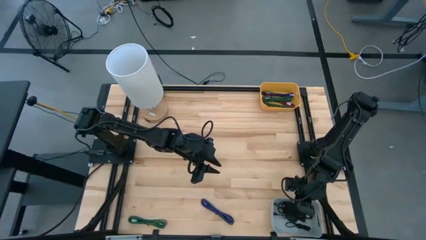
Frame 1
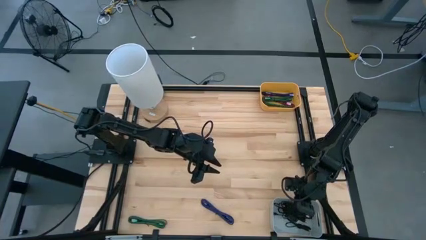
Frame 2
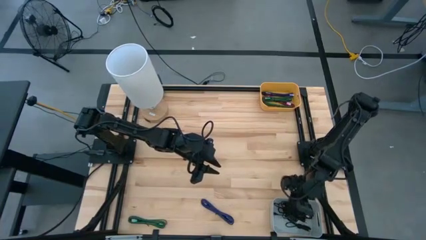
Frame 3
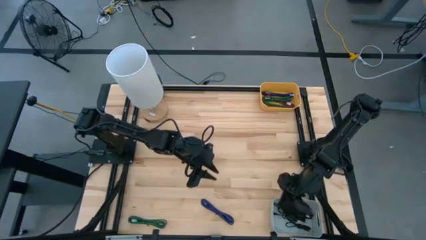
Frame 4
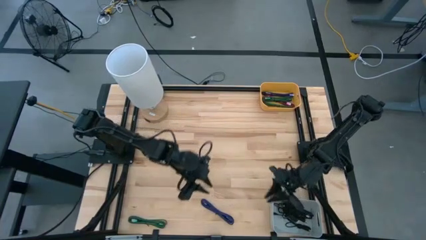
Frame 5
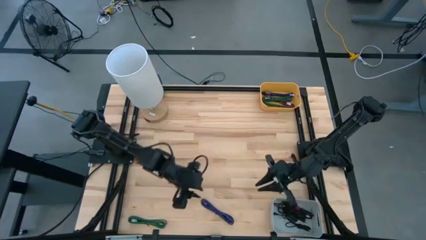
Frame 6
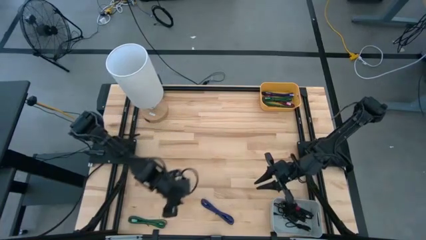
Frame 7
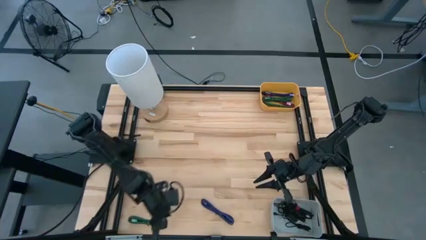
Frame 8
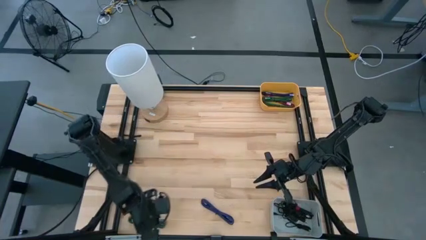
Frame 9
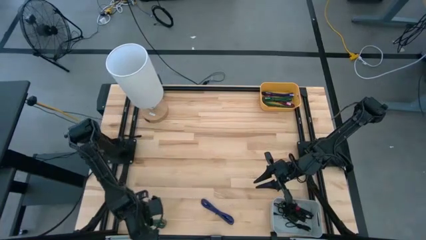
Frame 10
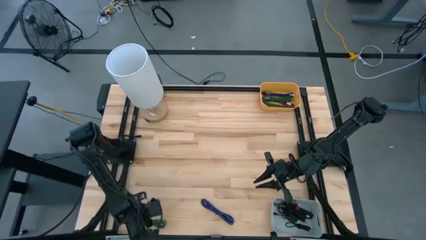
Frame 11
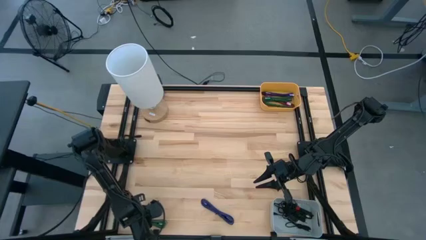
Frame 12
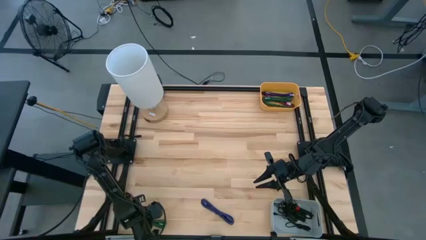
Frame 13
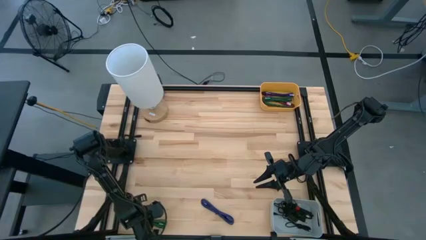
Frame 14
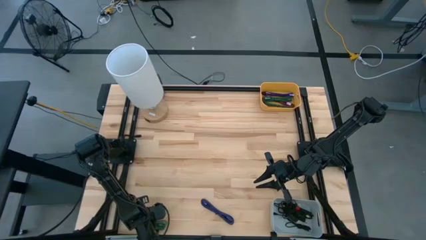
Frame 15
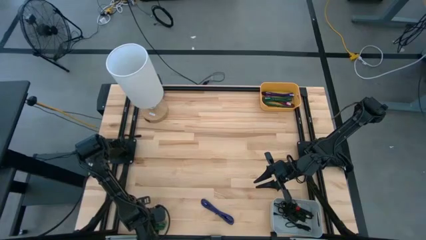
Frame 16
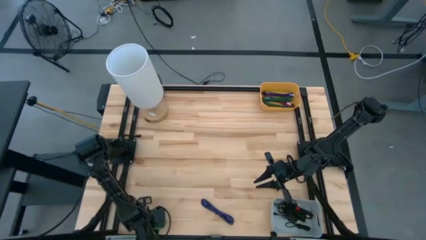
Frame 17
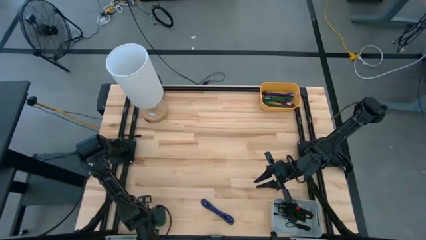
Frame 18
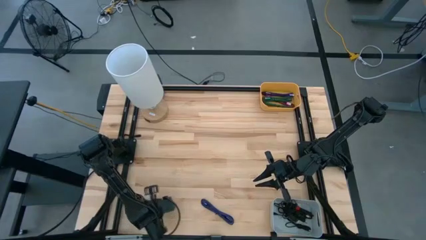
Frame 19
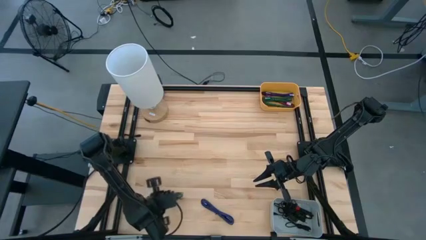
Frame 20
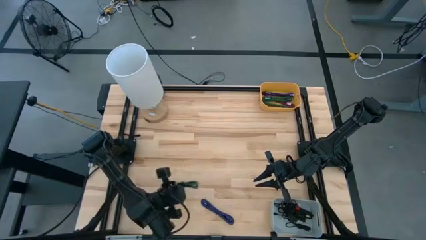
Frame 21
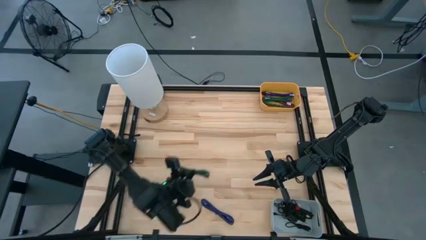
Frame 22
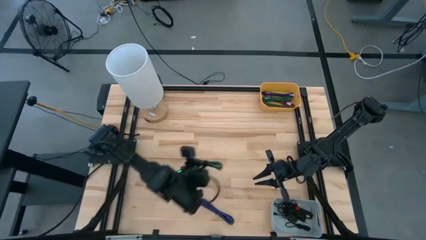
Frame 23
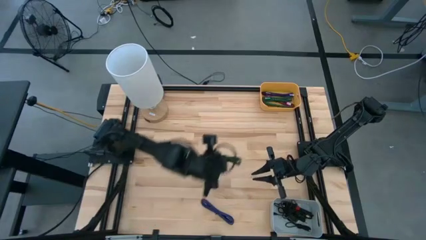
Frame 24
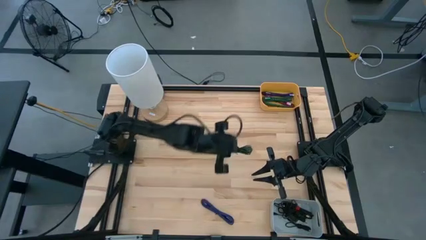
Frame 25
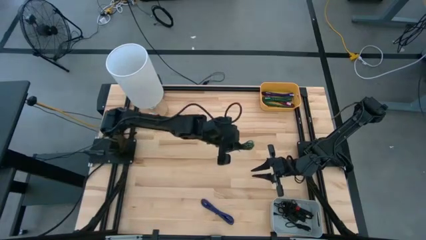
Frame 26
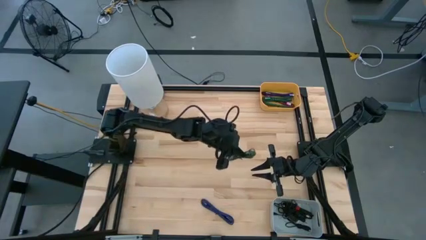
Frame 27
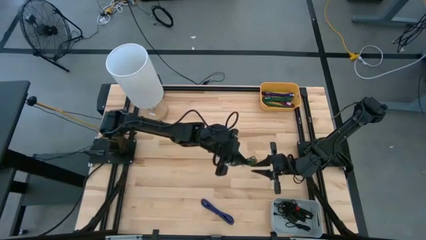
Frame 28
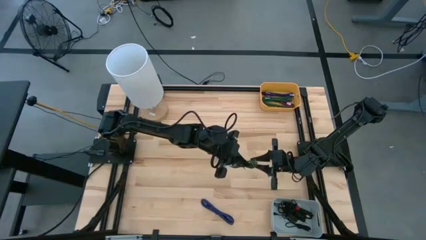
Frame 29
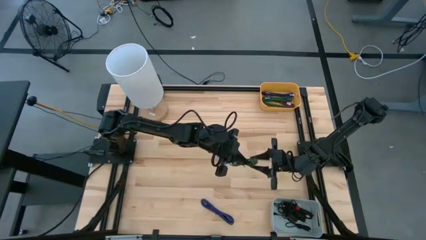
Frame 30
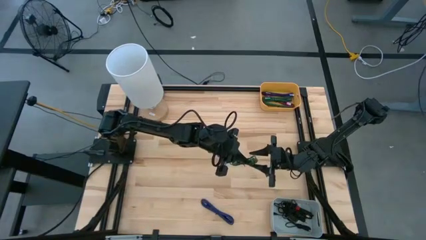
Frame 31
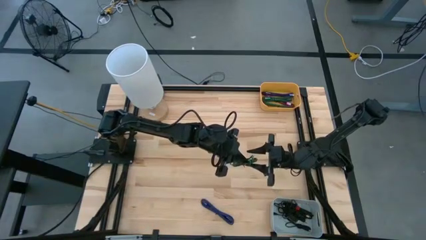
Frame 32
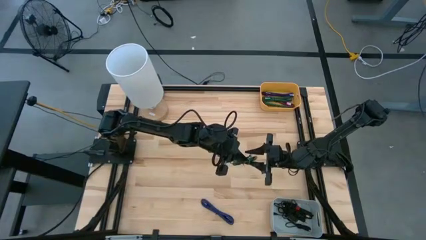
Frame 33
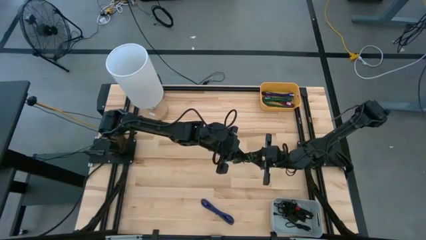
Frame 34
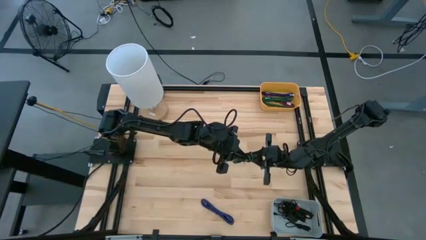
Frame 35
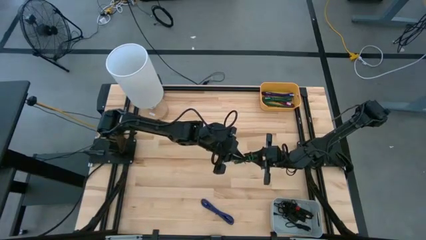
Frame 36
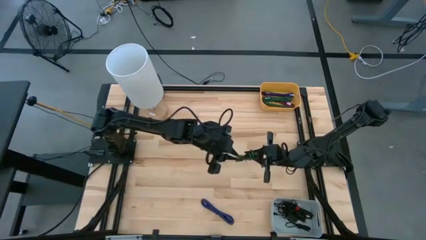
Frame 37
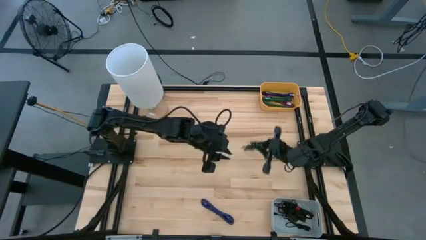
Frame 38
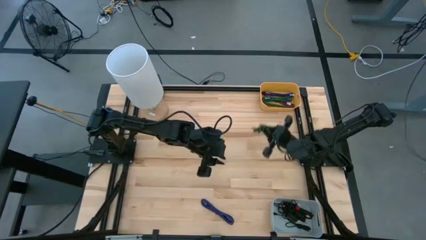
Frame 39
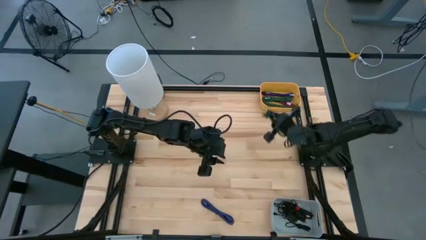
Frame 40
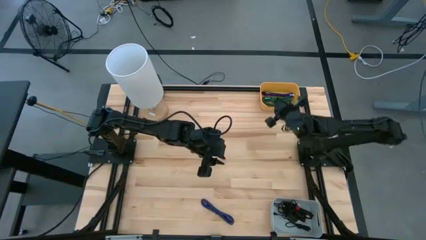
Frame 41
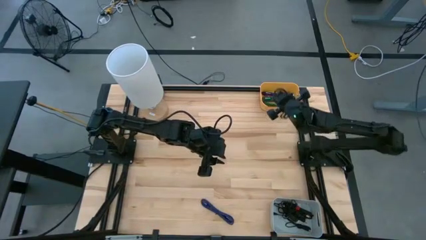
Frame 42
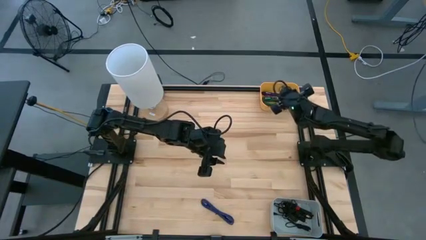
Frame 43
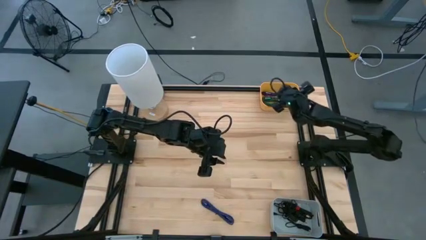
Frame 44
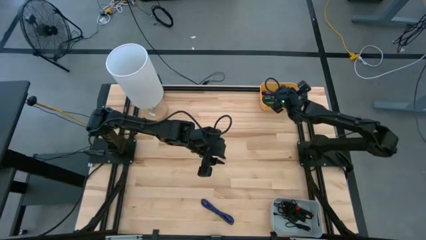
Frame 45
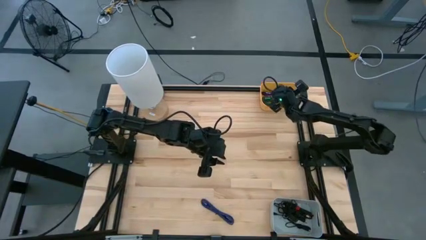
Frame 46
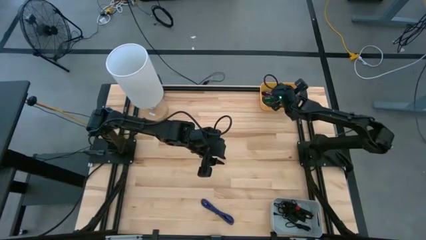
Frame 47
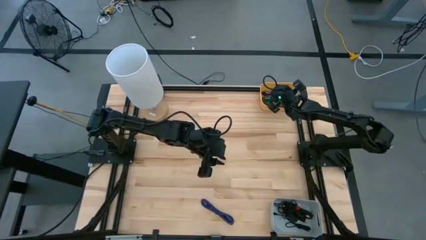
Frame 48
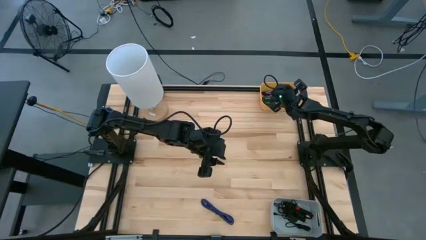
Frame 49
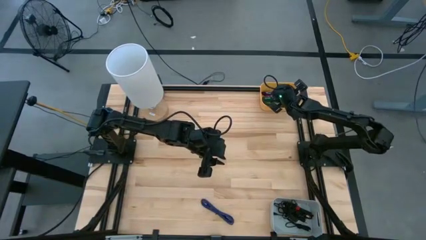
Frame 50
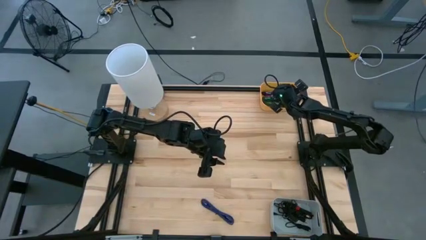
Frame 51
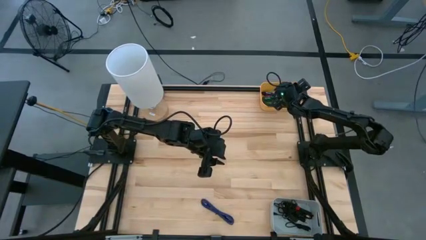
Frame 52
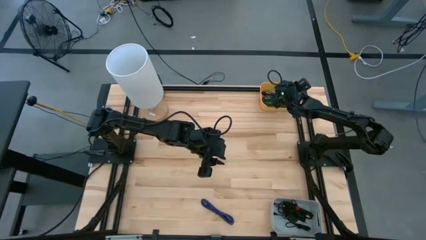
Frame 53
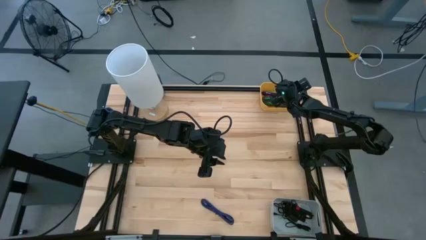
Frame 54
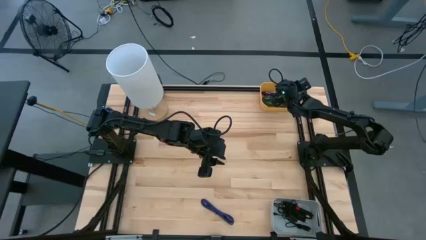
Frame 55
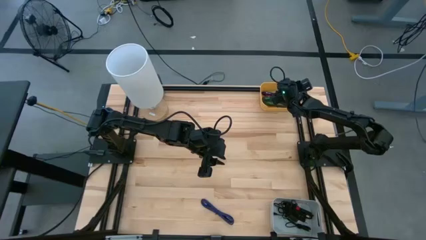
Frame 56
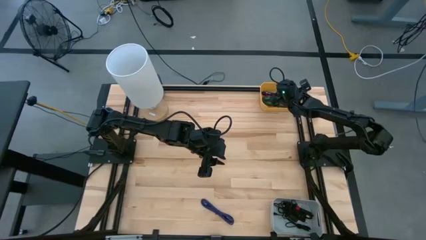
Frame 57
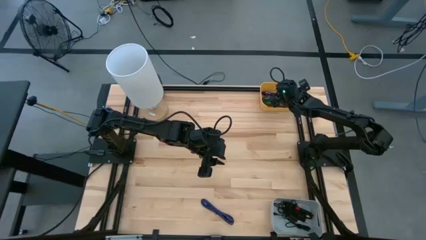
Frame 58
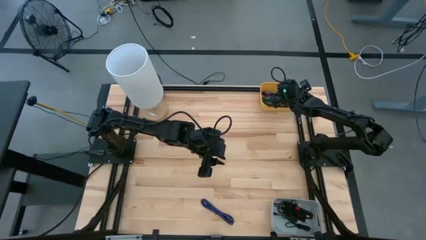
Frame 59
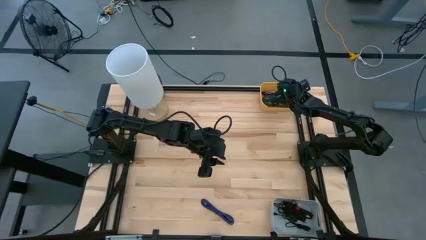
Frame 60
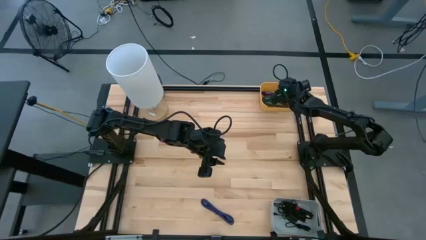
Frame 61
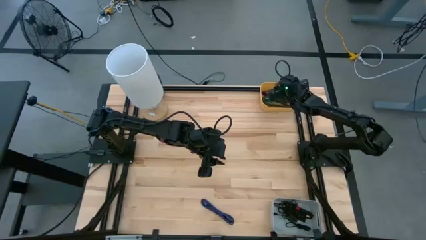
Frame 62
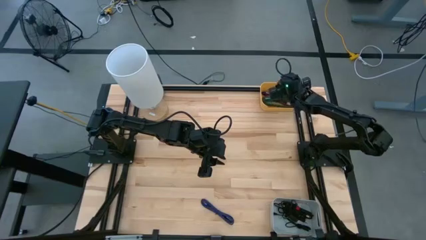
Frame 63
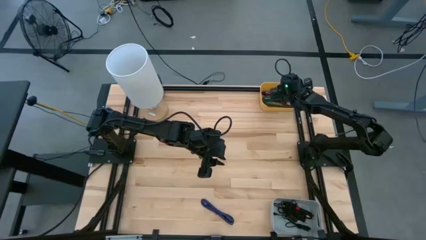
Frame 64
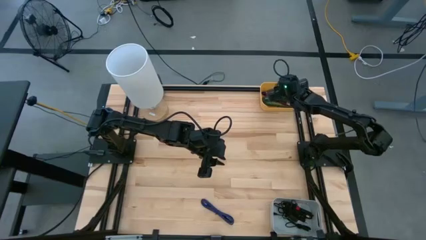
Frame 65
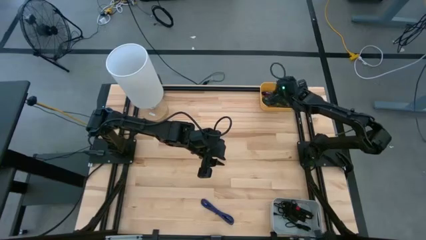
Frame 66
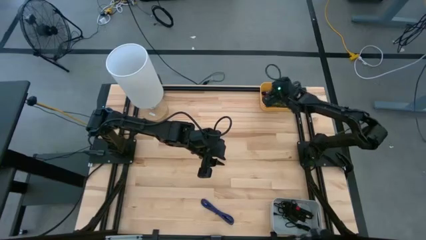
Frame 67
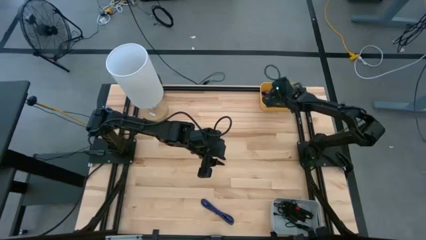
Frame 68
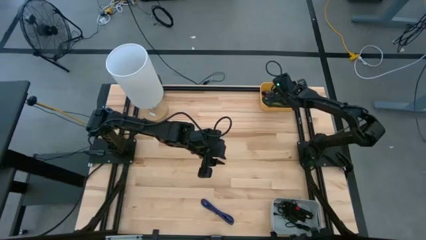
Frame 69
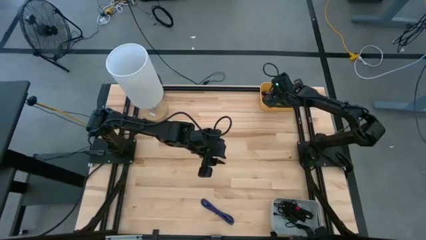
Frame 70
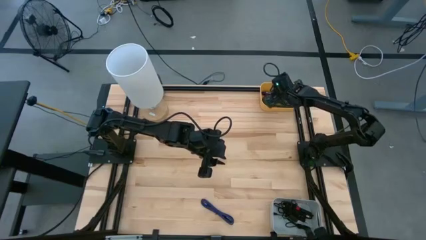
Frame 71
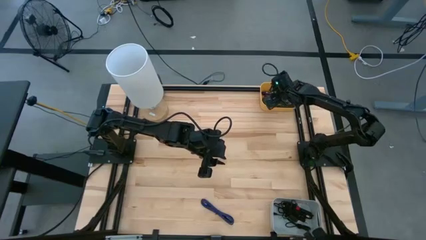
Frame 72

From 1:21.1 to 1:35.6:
Task: Pick & Place USB Port
Put the black and green USB cable into the yellow bin

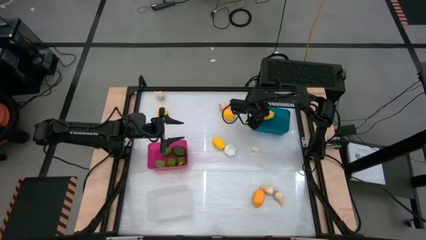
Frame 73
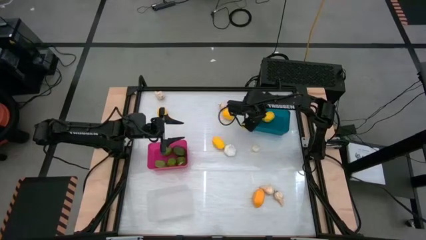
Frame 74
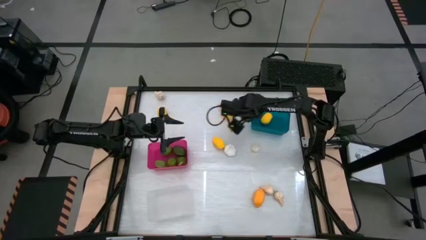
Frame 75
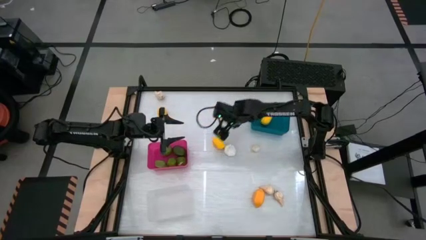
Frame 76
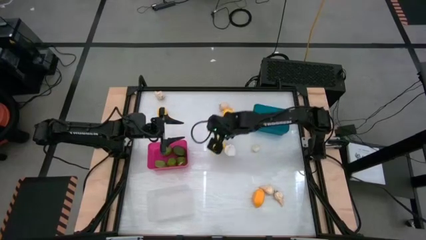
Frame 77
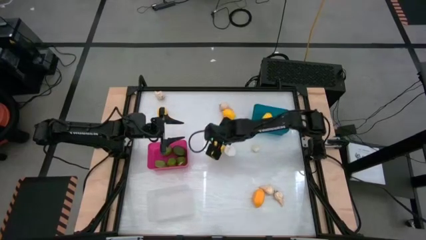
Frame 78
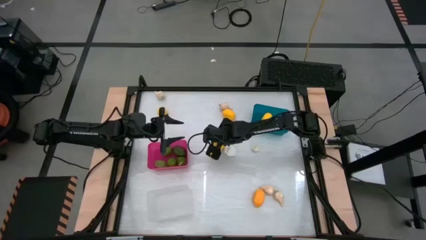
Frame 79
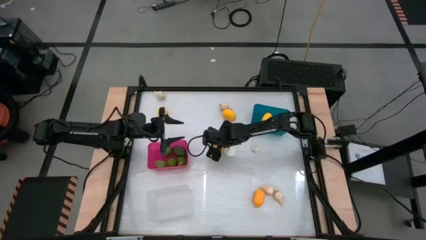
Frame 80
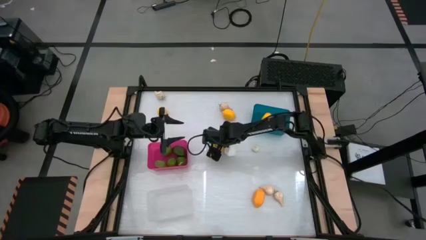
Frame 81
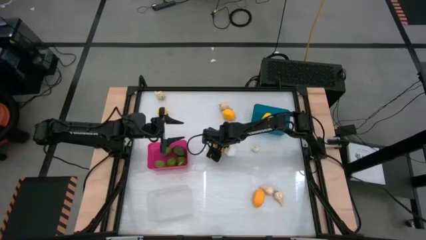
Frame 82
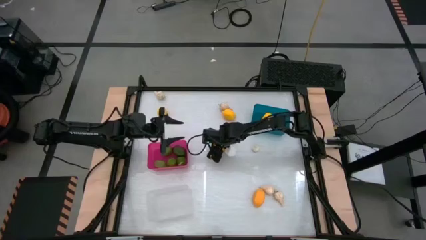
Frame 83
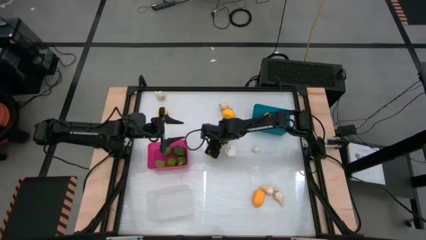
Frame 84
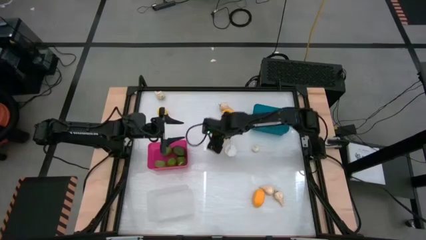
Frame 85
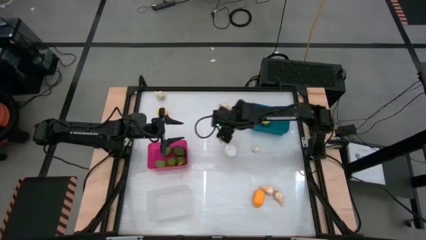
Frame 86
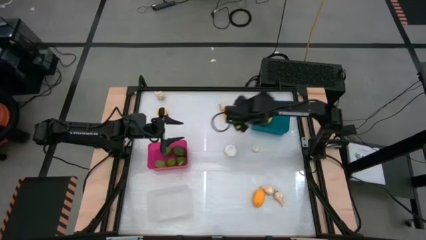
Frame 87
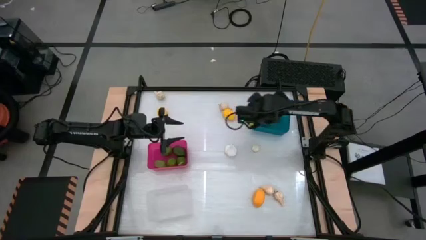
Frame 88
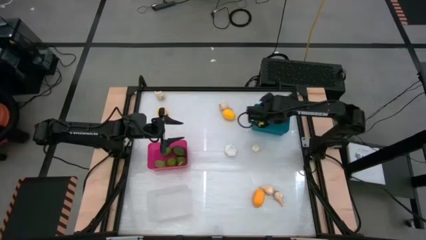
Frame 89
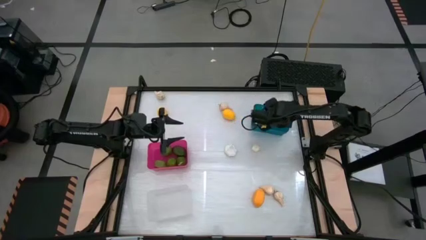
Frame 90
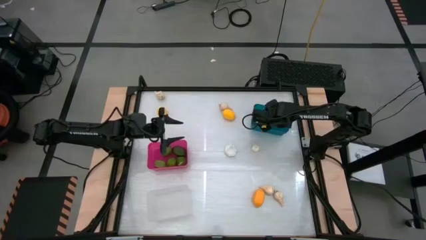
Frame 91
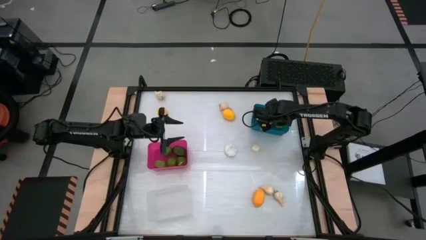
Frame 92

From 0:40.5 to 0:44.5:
Task: Sort produce into baskets
Put the lemon into the blue bin
